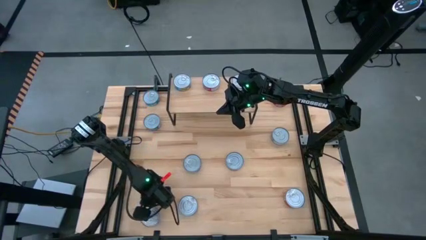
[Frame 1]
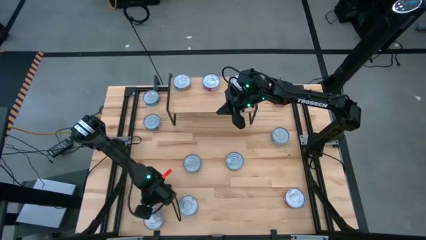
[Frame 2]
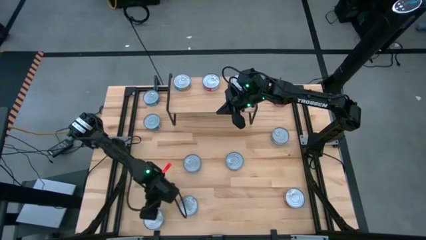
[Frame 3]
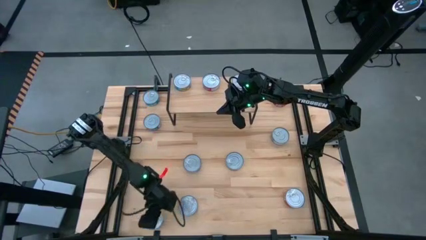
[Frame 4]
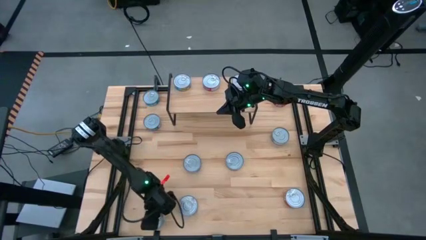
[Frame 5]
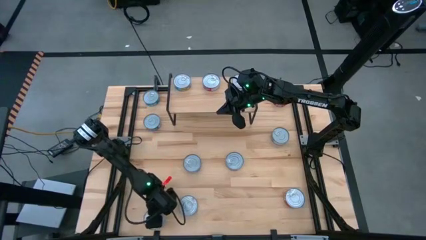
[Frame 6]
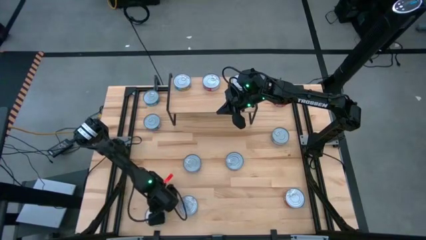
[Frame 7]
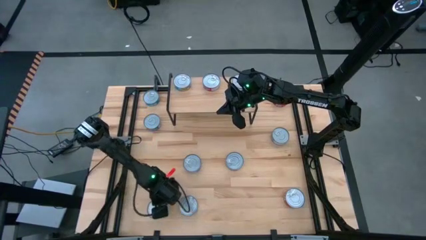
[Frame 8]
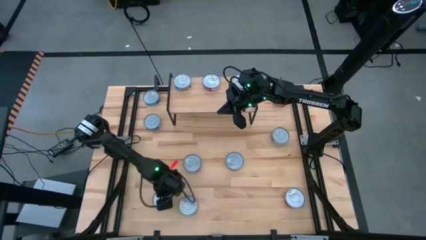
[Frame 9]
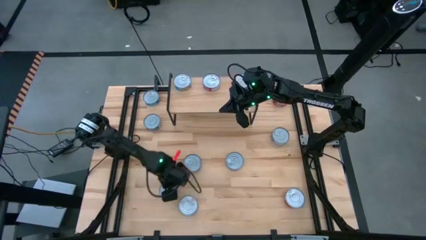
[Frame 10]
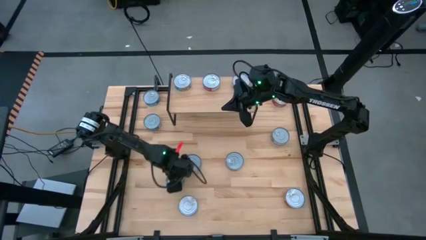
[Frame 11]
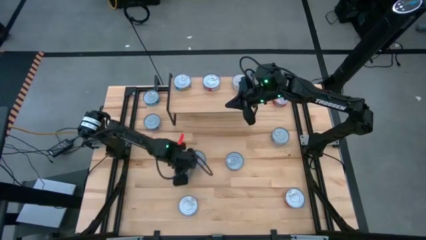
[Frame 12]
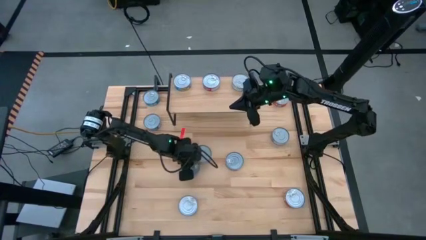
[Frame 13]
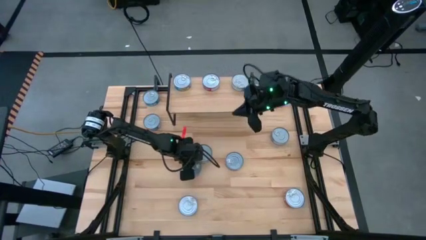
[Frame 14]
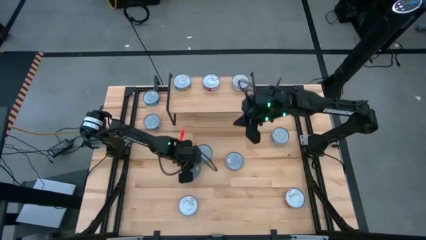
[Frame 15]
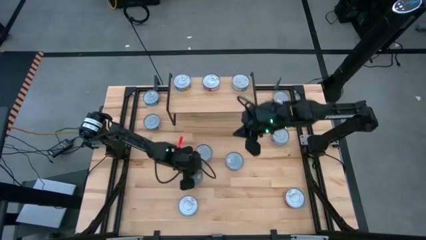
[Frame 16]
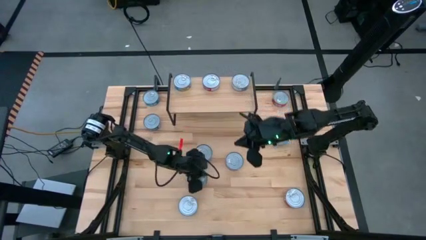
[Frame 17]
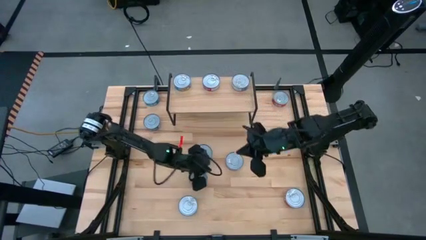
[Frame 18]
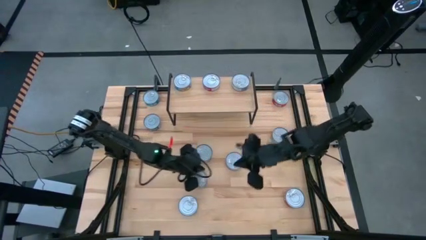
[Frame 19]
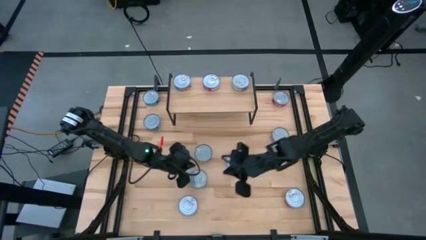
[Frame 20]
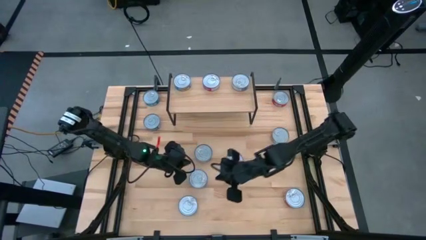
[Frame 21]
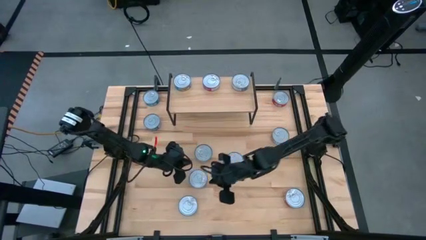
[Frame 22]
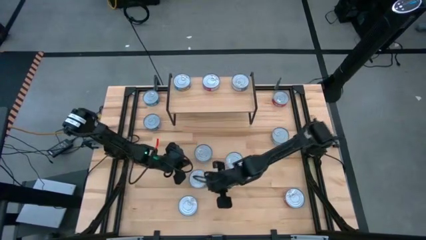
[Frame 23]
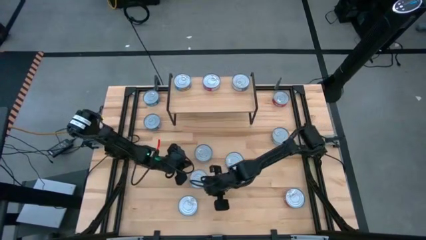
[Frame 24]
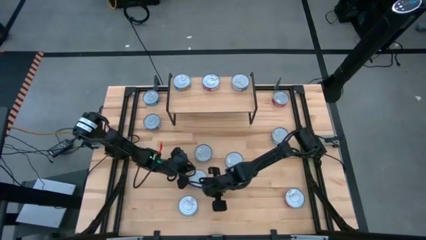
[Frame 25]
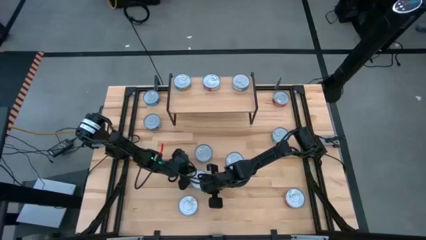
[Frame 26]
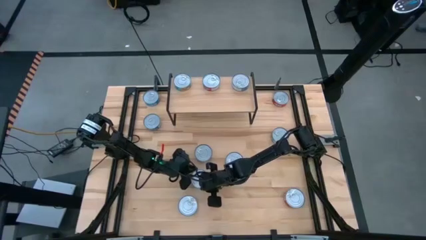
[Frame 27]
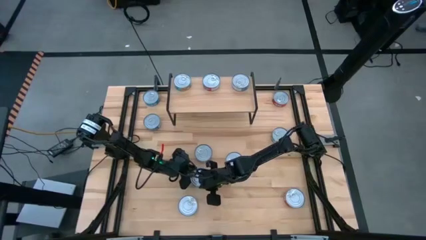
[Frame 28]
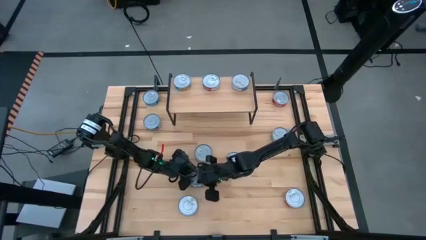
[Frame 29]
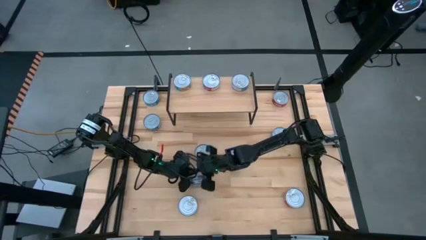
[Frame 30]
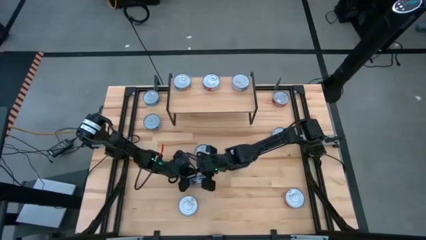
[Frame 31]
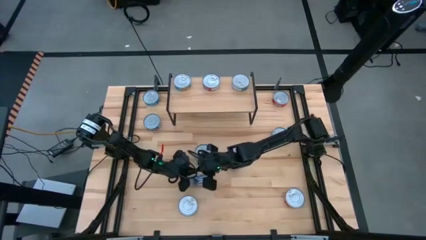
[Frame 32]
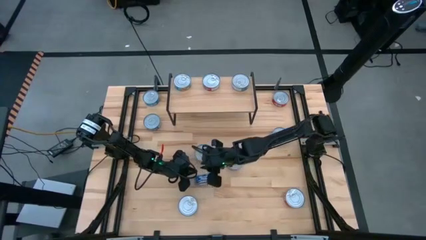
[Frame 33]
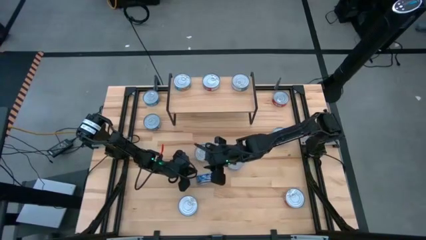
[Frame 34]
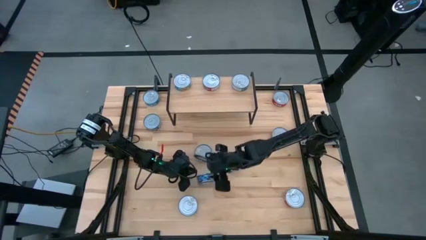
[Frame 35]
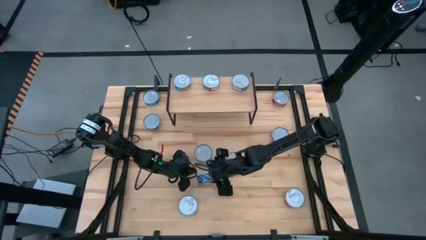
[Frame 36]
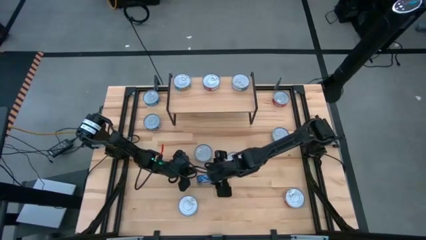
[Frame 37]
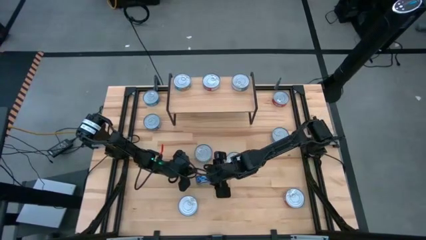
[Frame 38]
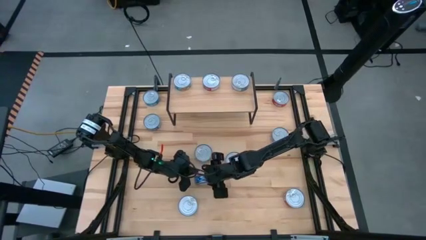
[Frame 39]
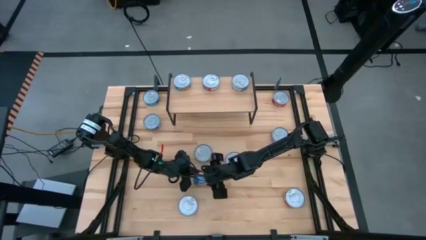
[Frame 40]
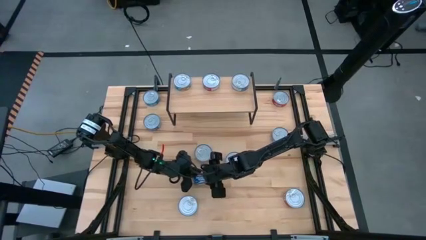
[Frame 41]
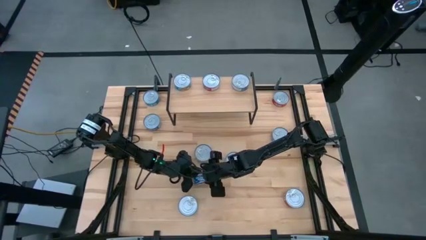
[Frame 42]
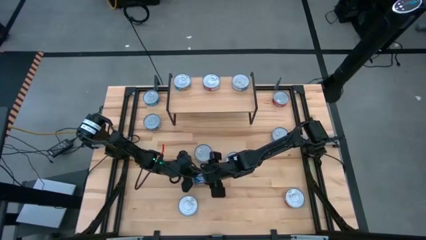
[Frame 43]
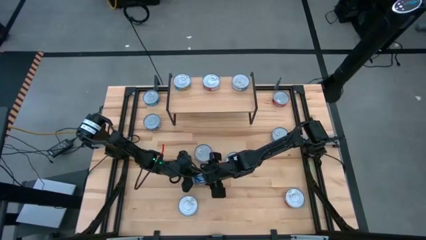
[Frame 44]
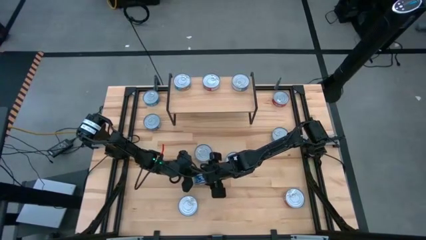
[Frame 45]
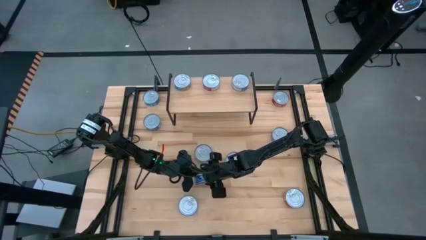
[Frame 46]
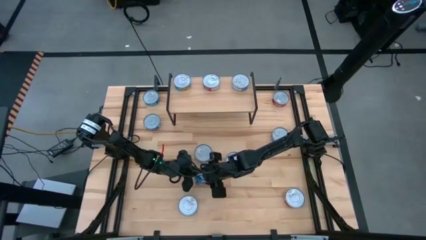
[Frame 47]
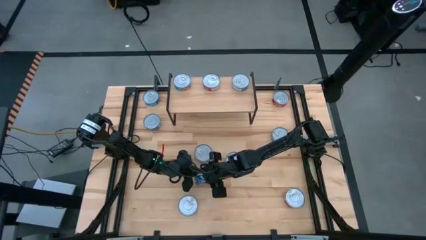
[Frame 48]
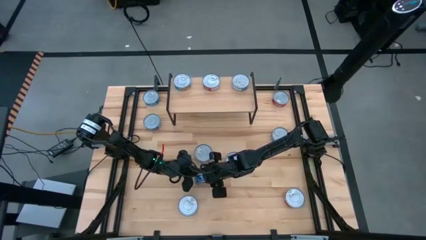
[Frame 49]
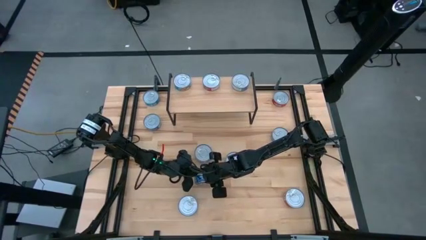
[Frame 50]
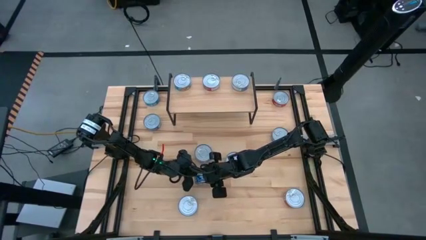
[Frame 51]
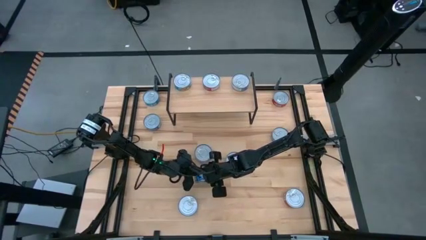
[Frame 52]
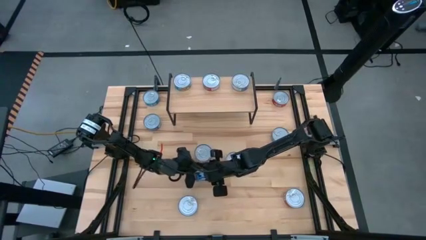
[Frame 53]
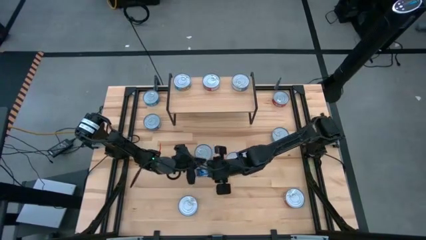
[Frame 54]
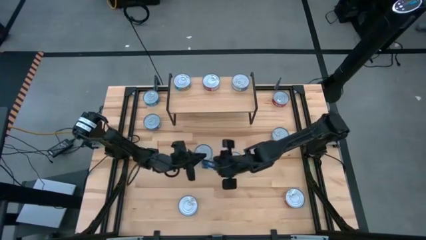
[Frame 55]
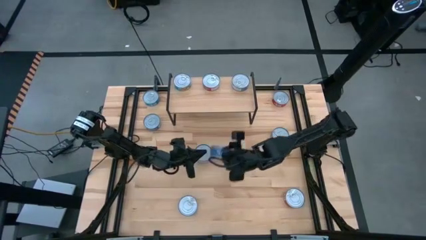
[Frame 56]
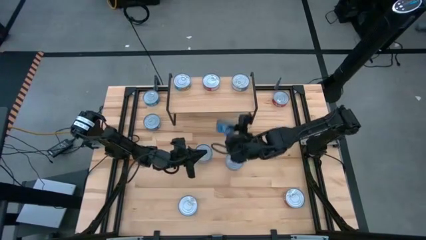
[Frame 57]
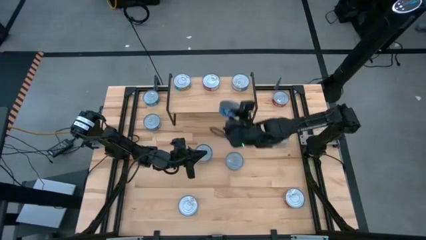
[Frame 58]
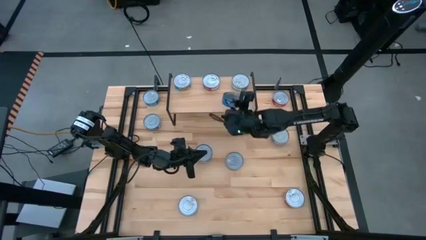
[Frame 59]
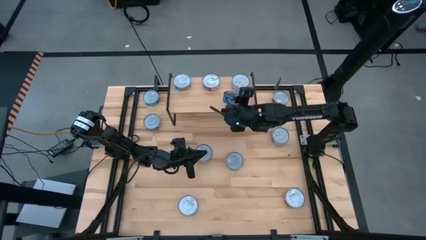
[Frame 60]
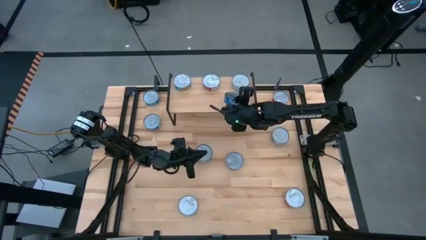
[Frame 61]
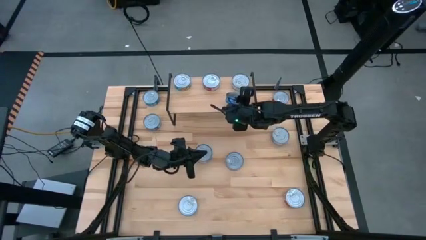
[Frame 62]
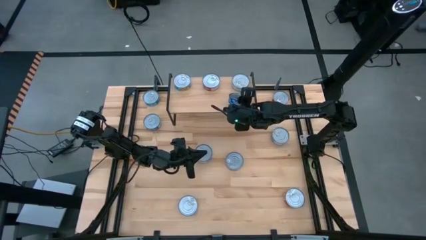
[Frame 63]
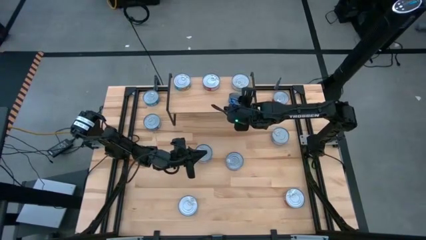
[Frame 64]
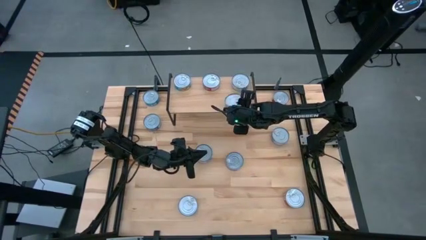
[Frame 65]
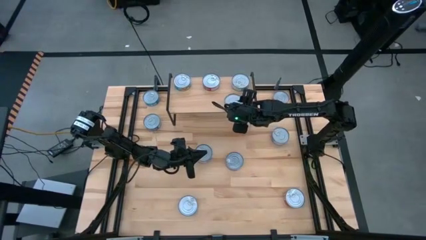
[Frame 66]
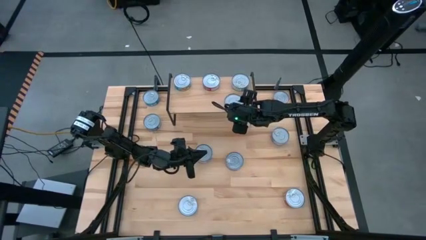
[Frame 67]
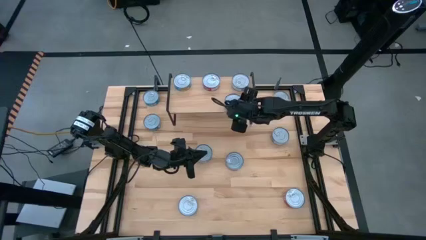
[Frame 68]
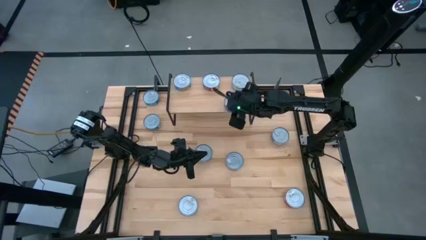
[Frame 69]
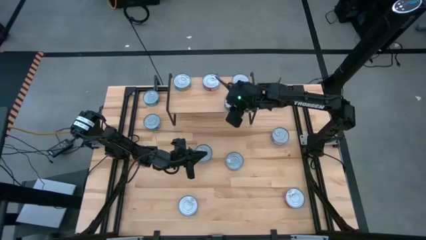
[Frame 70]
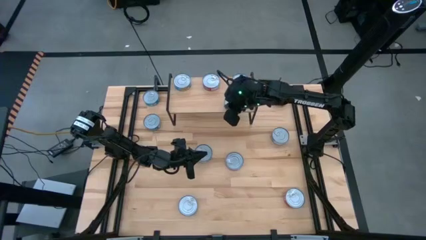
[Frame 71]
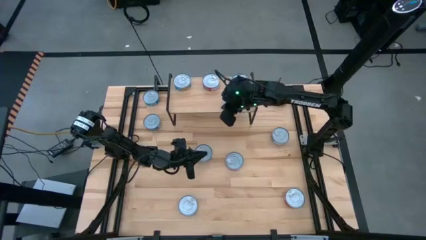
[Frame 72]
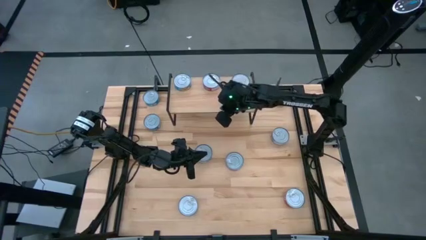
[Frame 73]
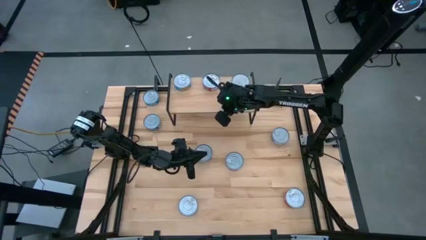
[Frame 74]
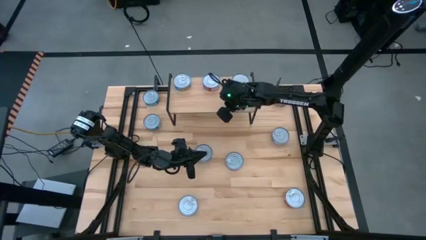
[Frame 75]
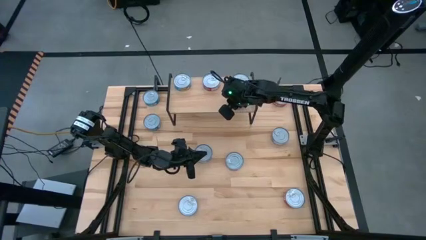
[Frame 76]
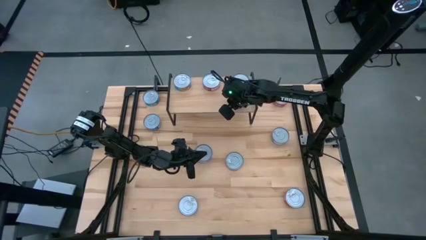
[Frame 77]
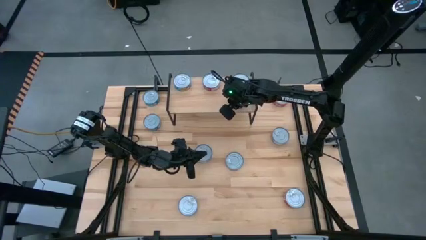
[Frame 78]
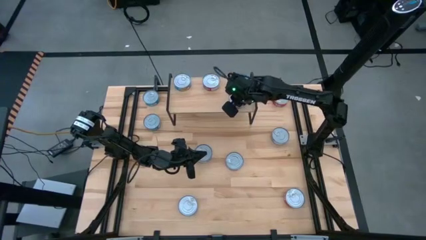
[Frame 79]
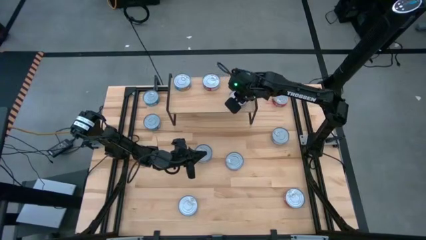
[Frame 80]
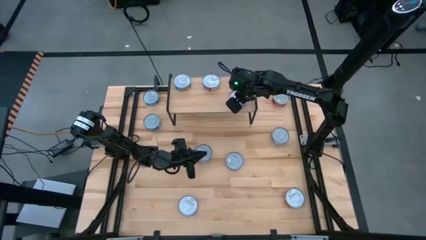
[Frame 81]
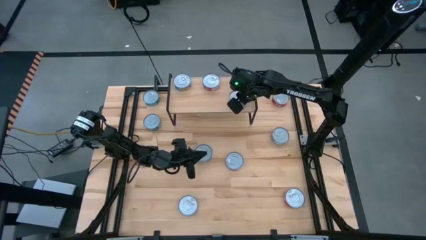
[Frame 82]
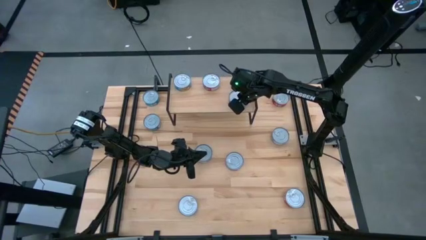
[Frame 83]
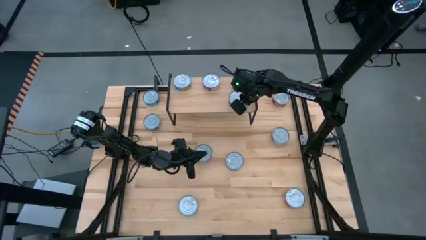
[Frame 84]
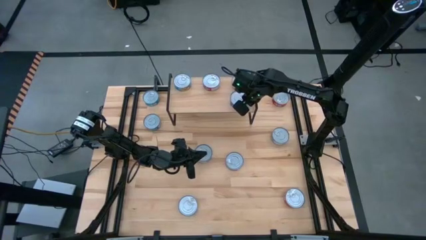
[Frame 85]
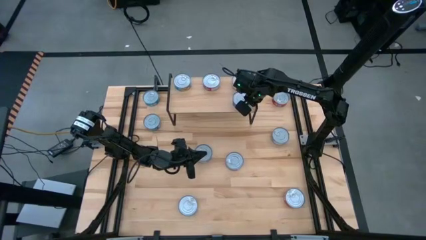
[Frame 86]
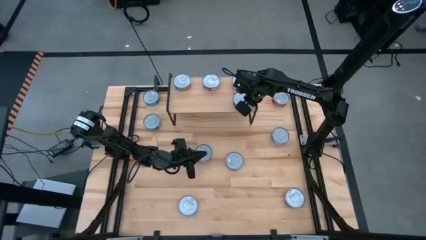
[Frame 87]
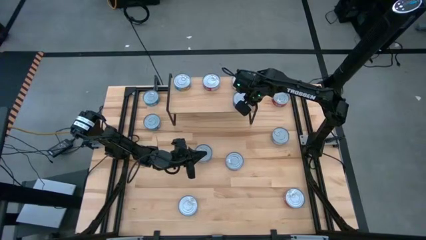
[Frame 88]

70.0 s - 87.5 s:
Task: Stack canned seafood by type on shelf
Put the bottom left blue tuna can on the shelf aligned with the other blue tuna can
